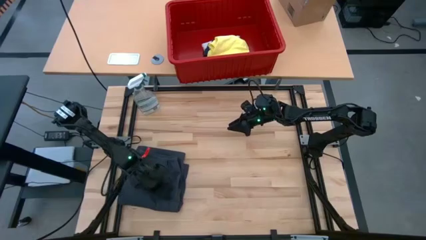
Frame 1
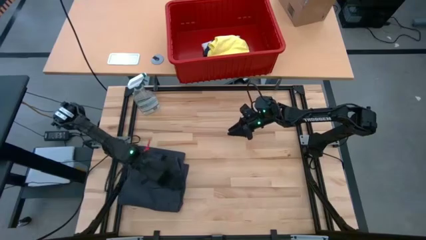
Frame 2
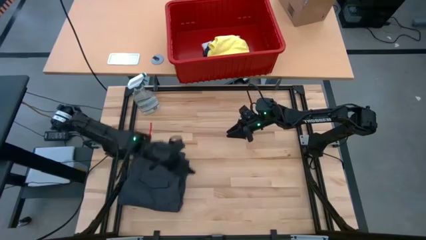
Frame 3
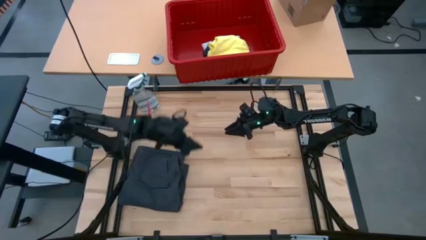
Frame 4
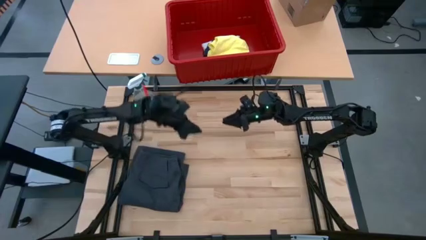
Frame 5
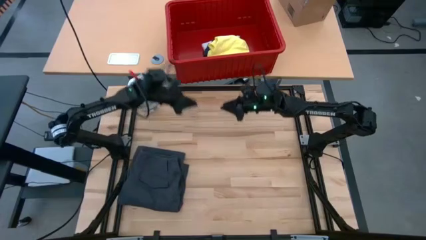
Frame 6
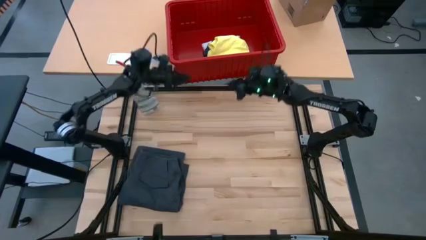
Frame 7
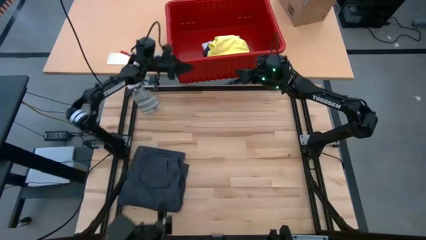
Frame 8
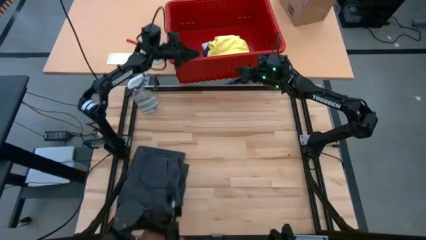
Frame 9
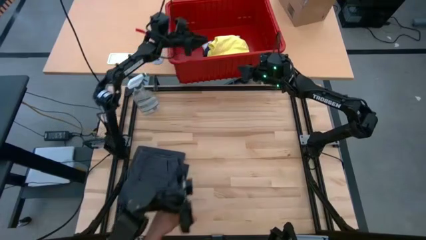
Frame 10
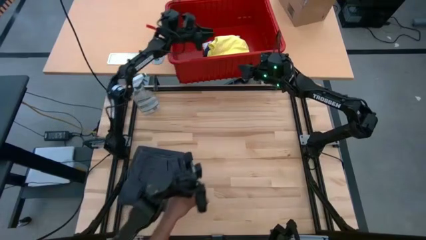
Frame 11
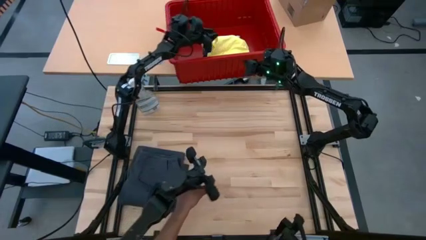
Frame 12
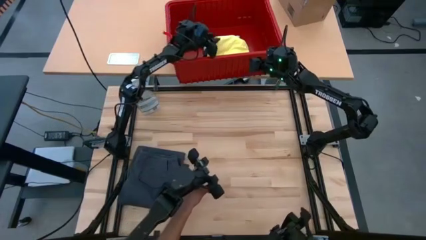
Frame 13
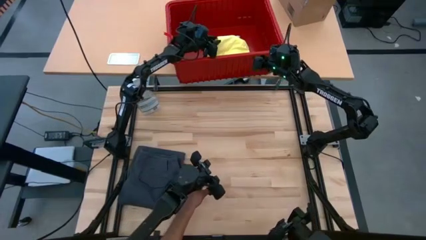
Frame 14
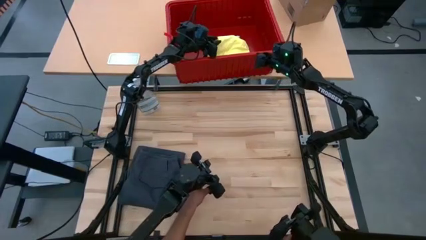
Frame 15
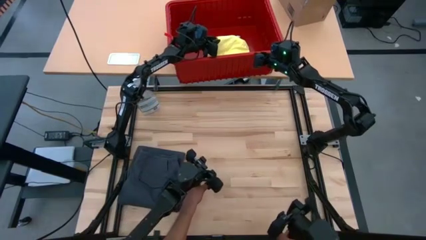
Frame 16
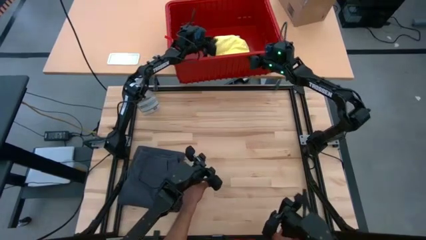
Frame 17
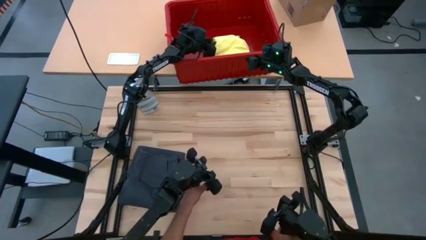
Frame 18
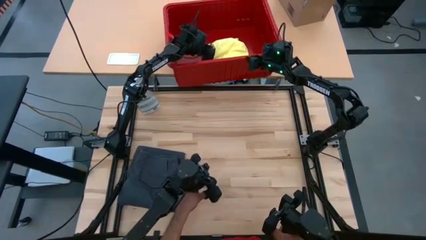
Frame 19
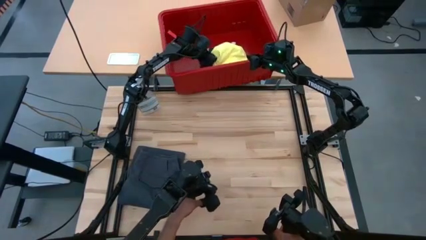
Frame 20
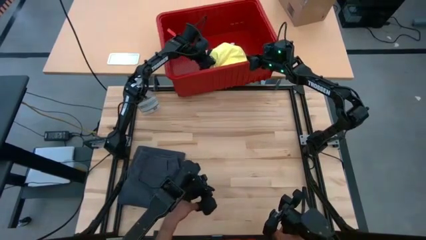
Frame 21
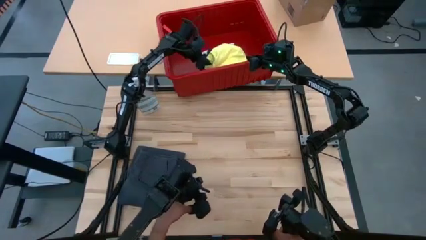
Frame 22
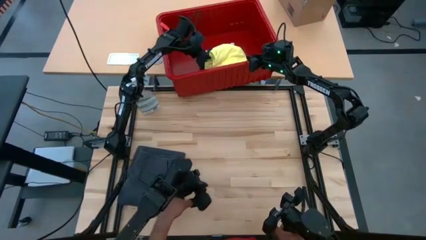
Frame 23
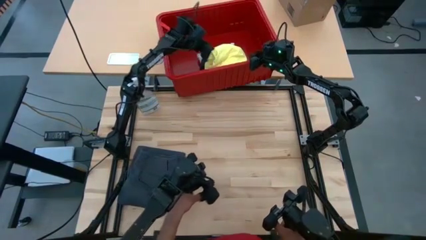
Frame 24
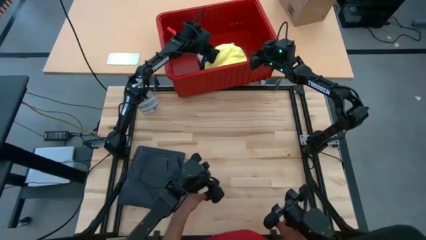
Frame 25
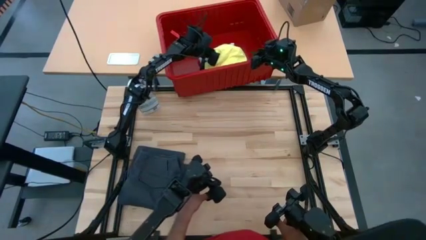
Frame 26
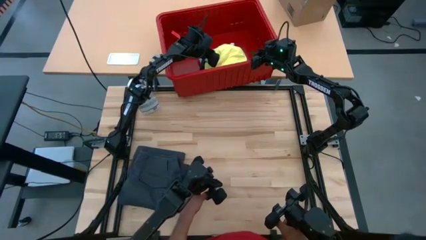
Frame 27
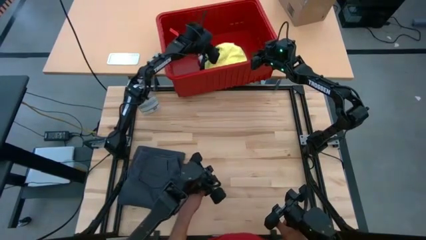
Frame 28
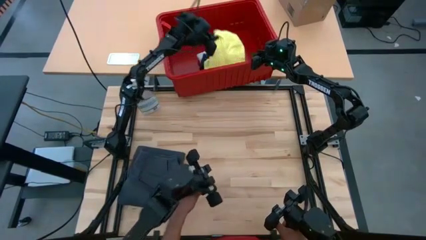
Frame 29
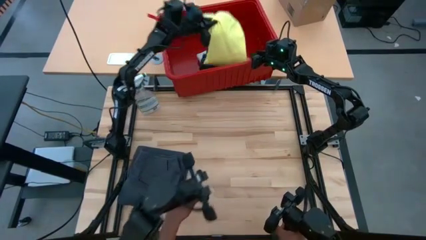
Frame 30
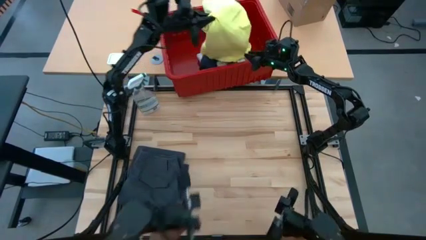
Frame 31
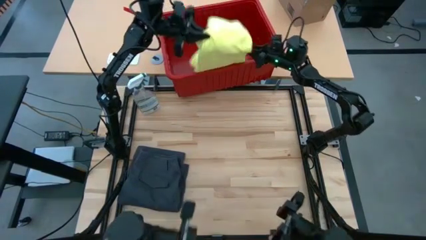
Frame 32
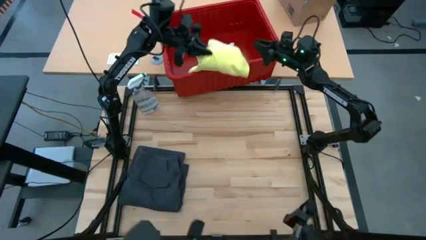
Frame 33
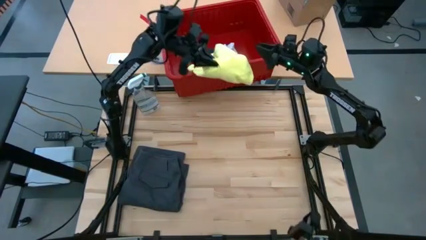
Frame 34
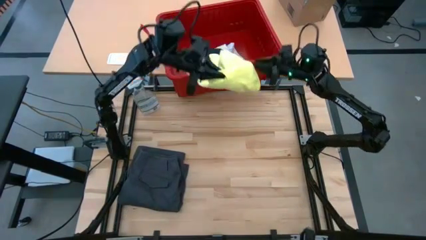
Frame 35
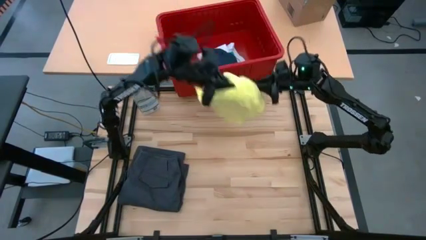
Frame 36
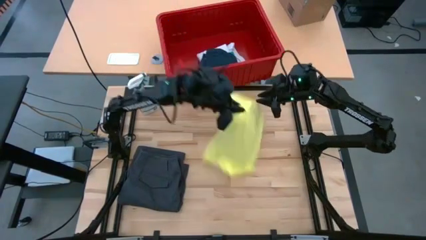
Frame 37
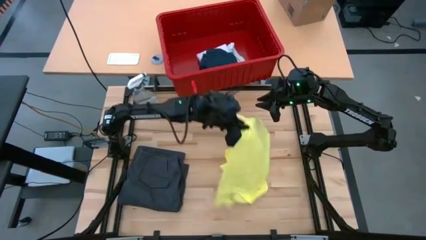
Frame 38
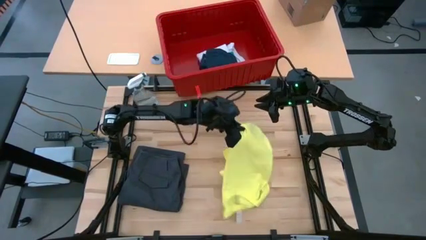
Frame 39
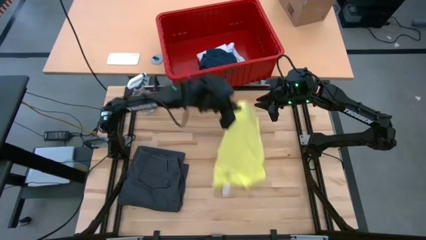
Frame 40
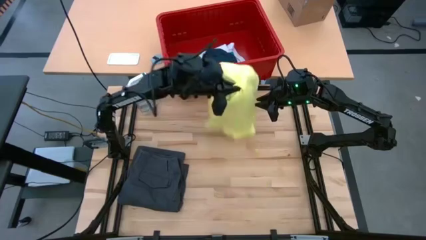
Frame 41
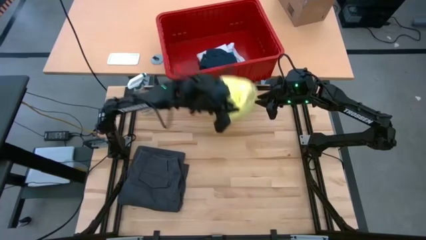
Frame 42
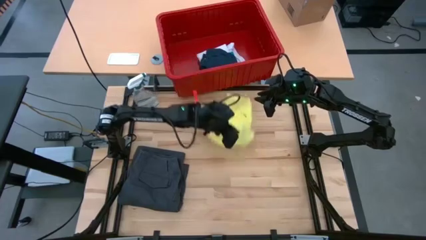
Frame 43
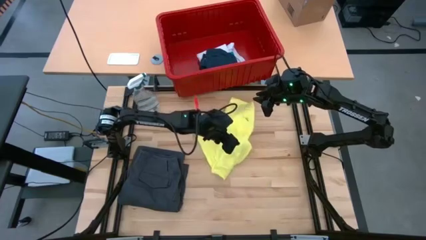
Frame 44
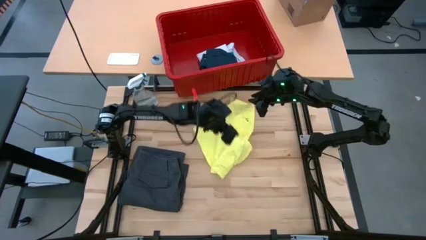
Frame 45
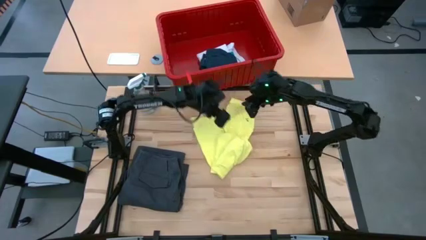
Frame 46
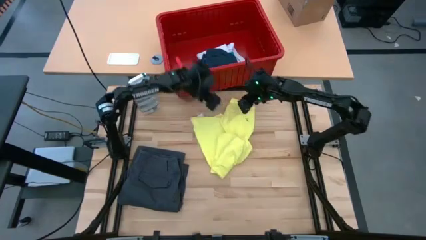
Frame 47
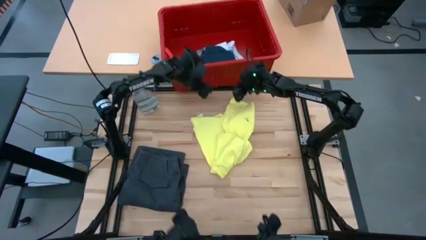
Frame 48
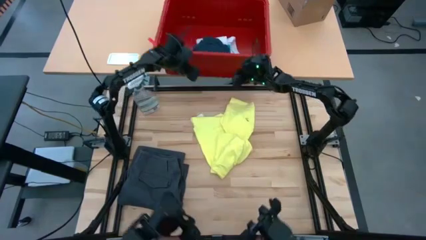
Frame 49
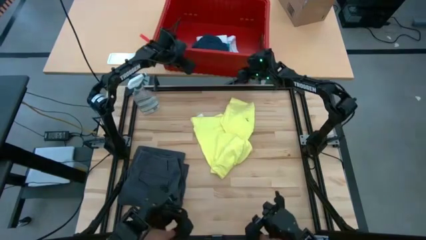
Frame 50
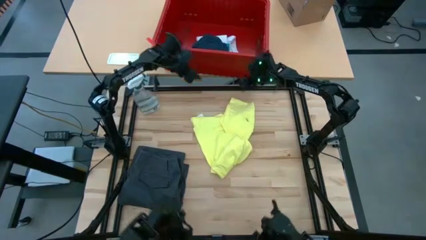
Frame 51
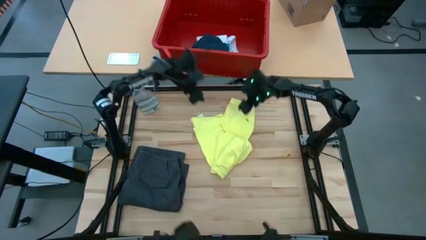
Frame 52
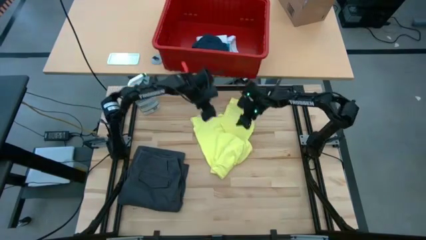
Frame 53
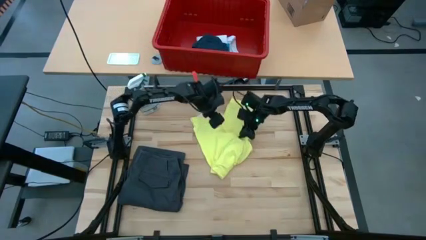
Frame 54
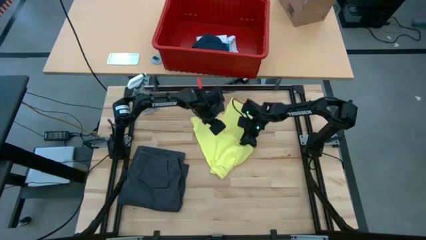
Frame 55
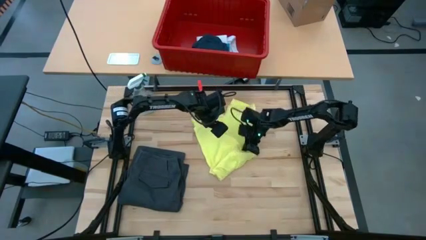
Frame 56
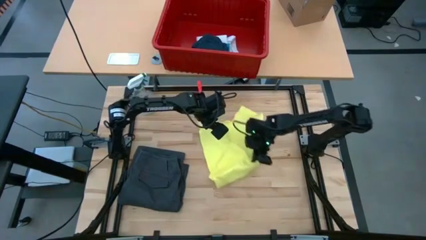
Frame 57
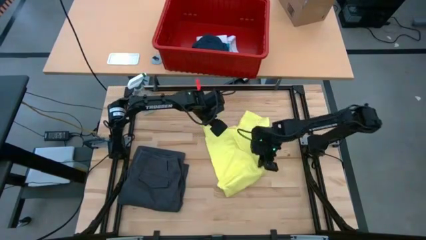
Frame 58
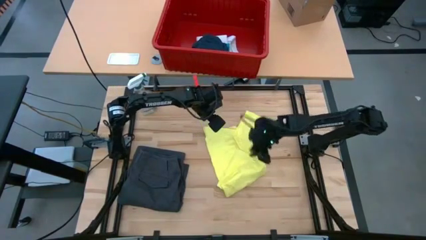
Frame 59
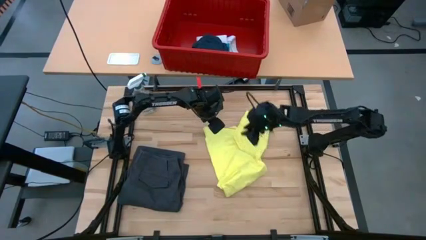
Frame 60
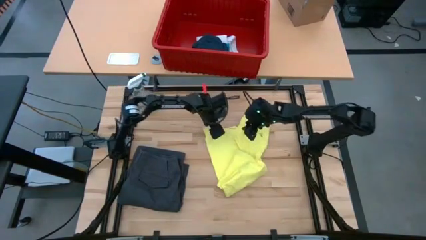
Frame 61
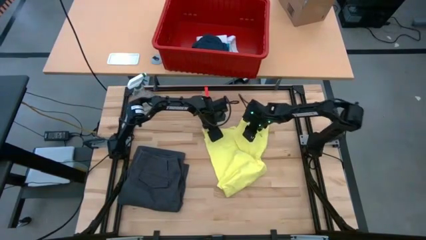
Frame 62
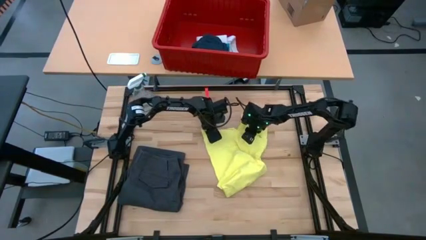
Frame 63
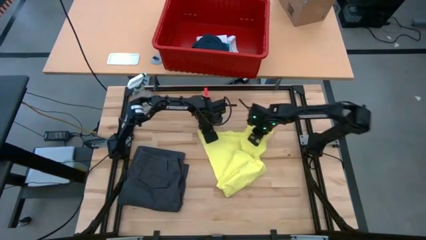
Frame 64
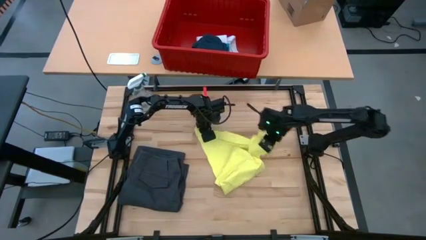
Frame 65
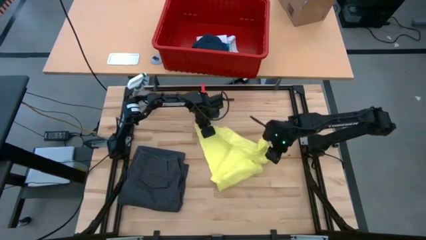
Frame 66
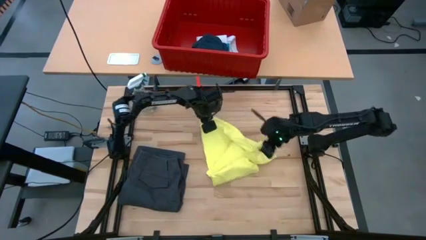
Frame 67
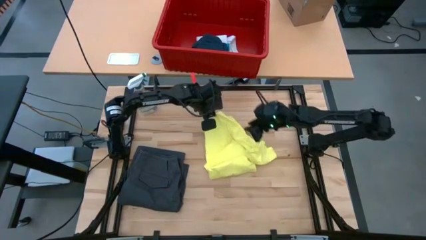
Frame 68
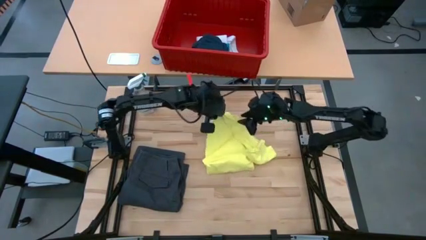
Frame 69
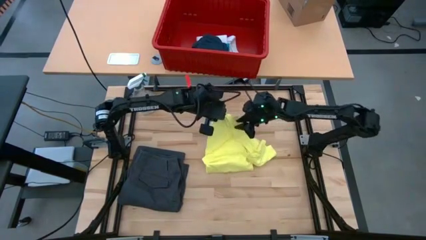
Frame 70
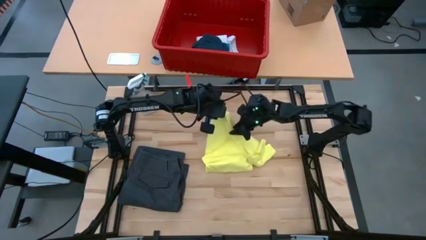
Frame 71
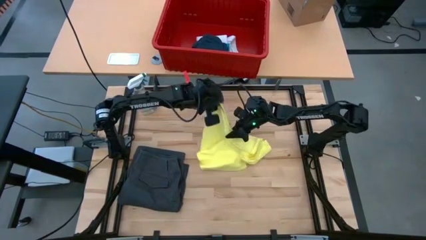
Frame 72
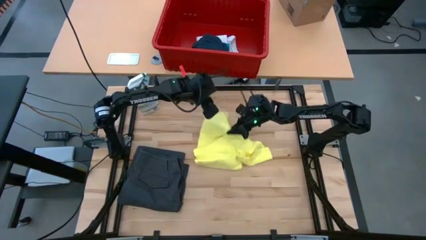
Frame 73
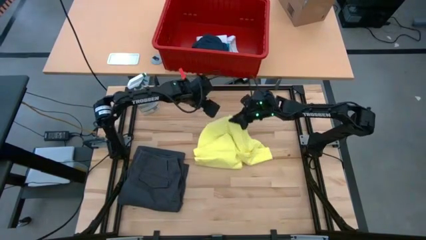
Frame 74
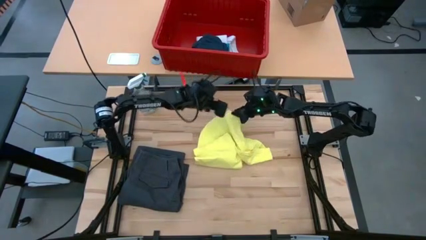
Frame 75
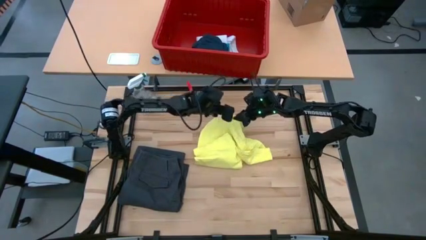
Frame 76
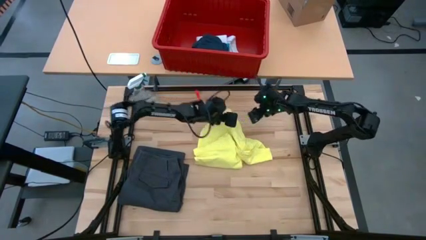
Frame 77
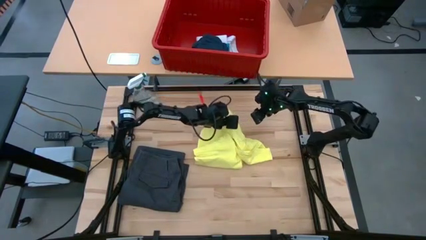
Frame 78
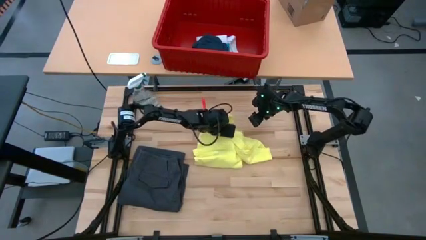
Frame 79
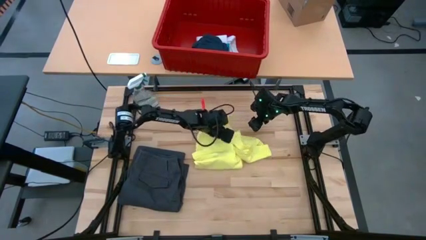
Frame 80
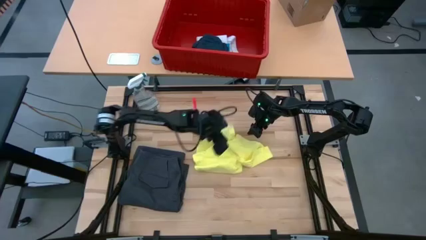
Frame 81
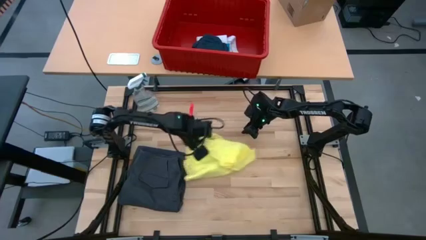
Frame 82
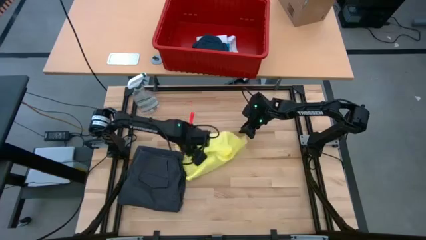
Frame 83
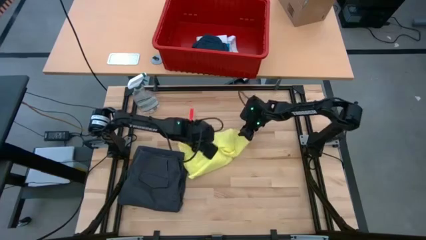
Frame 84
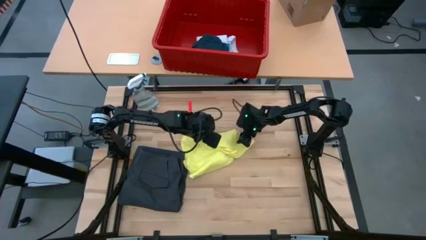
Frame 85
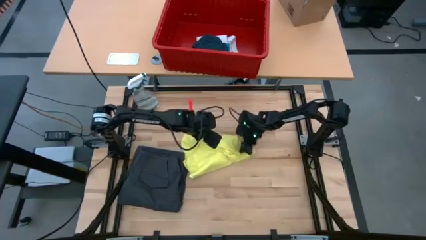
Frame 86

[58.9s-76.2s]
Task: Fold Laundry from Bin
Fold the yellow shirt
